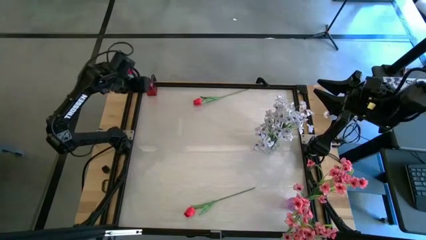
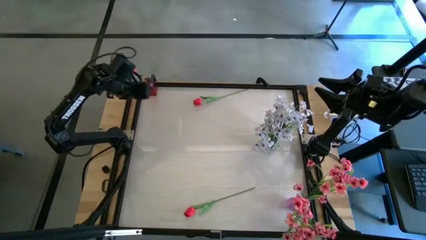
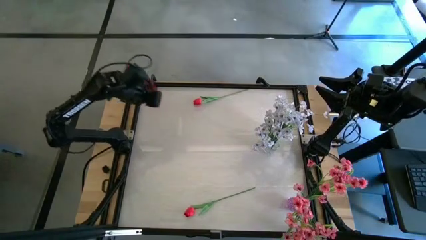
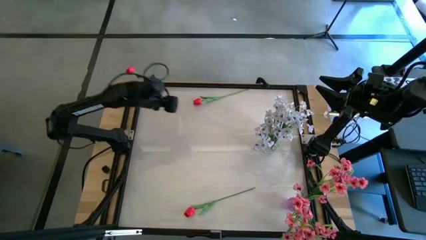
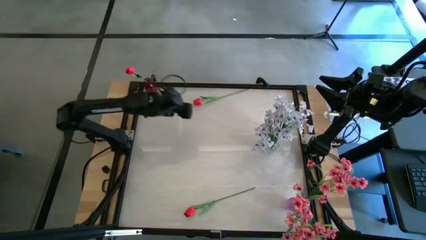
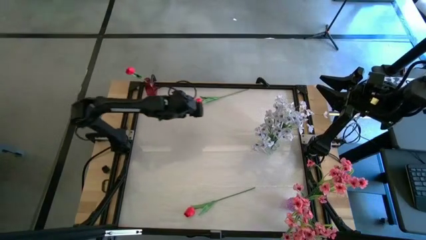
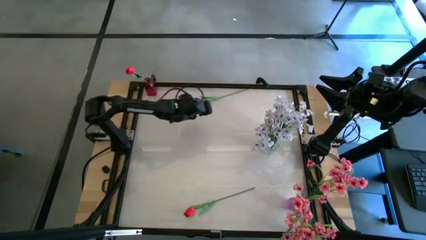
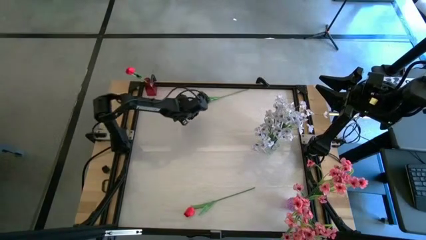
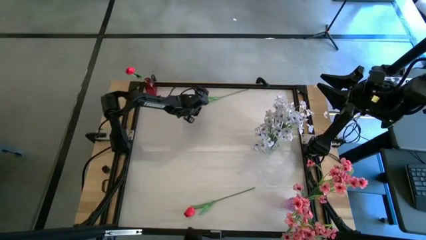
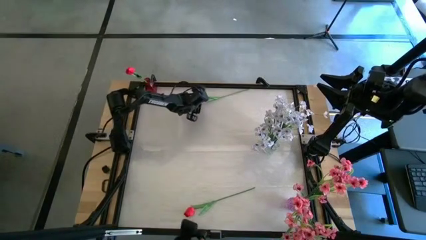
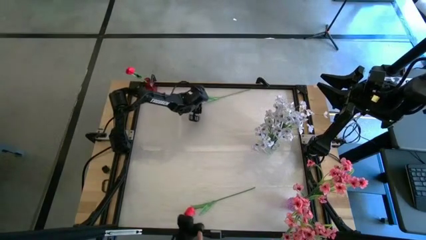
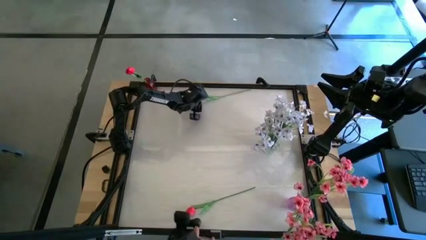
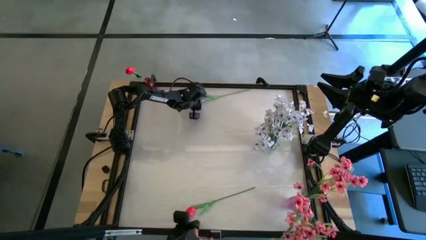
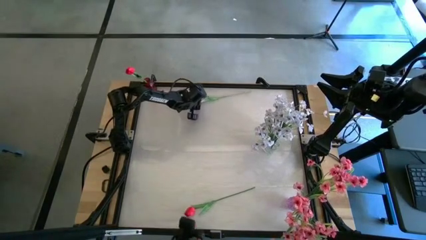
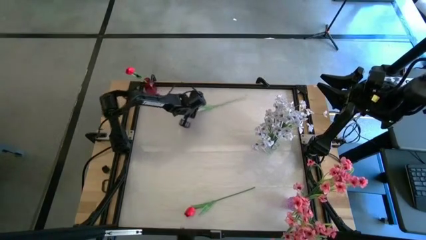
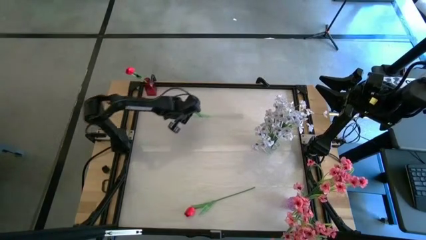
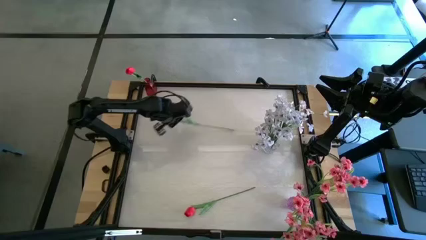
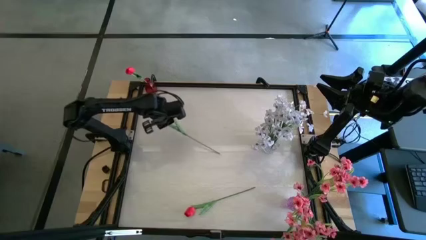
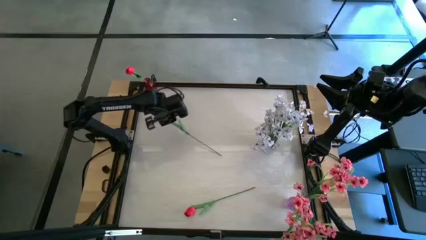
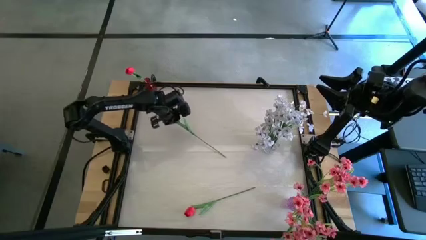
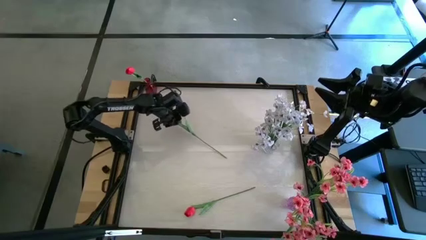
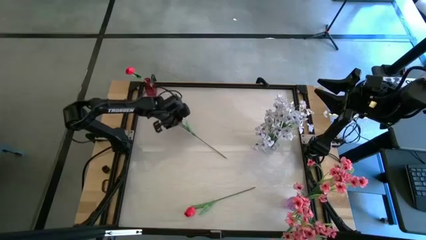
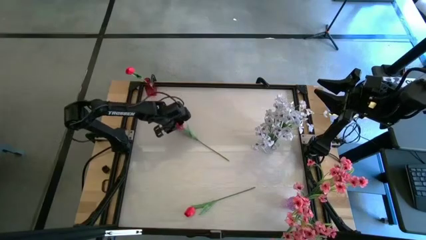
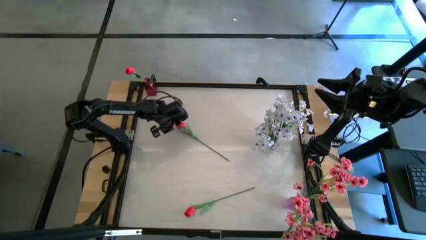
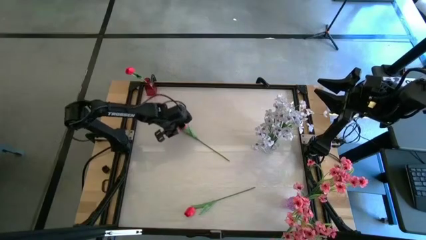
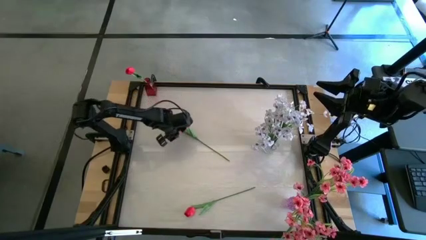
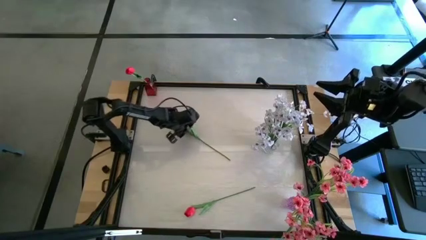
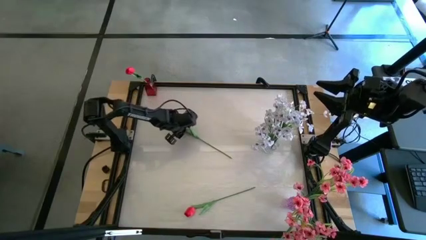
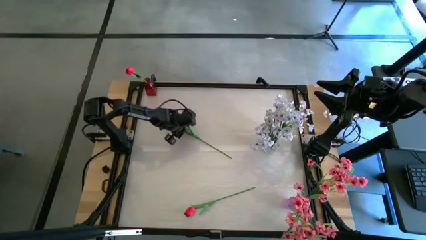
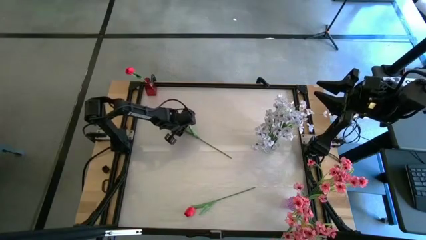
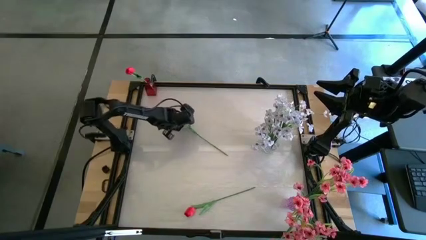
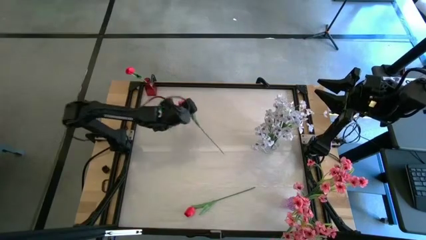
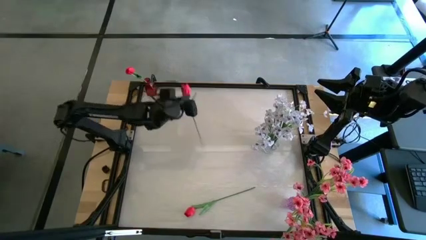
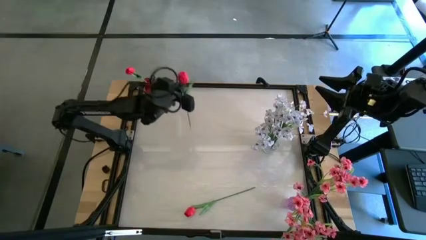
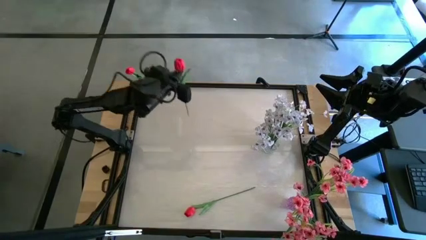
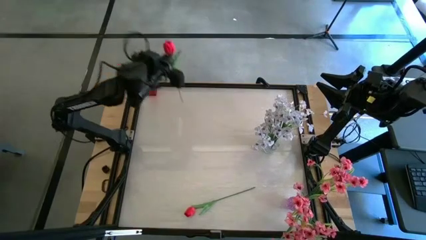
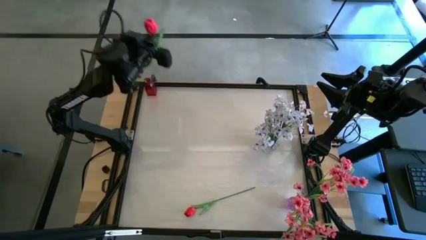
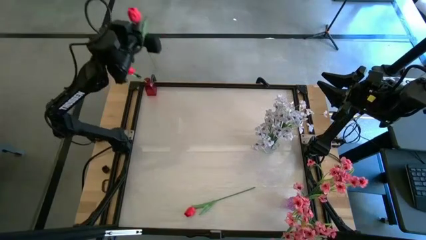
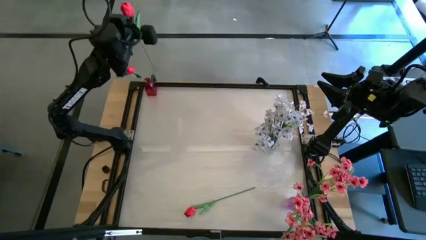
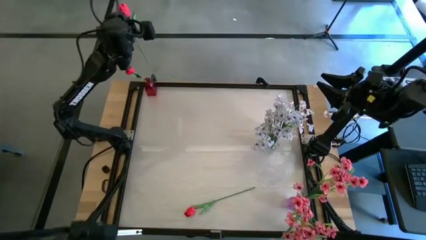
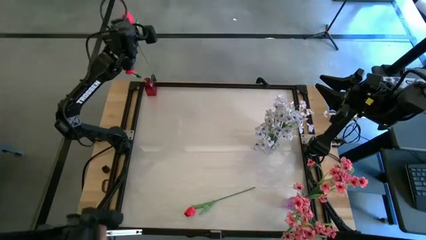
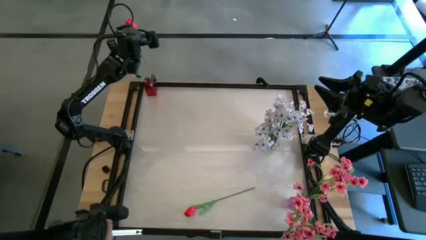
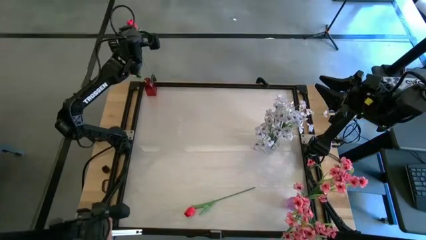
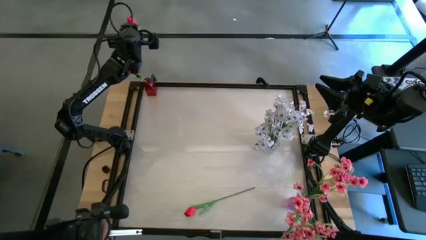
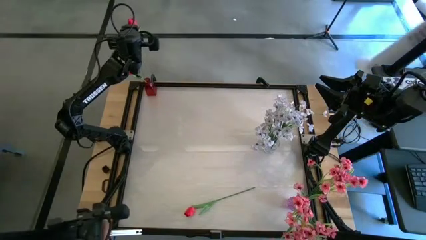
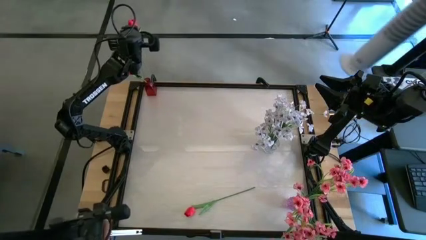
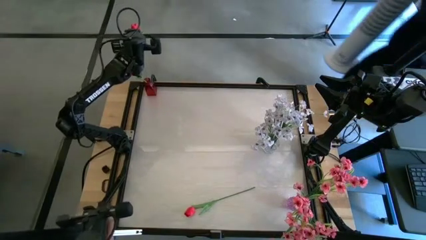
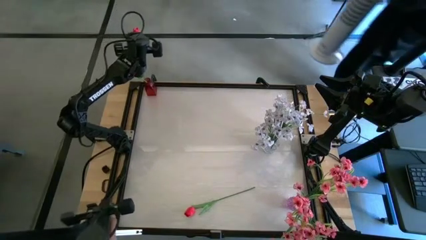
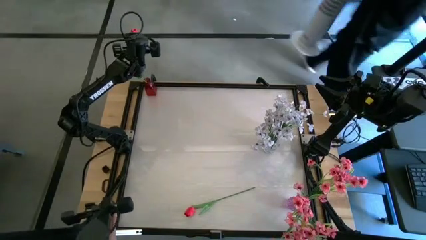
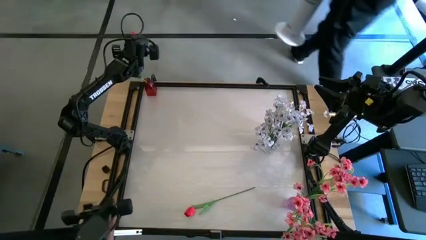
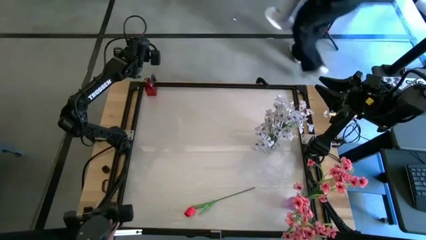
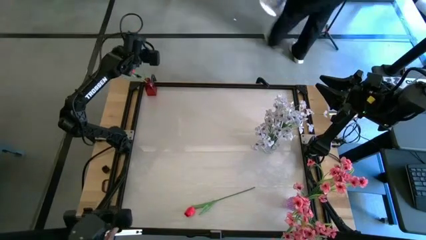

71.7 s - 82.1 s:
Task: Sort flowers into vase by color
Put the top red tulip into the red vase
